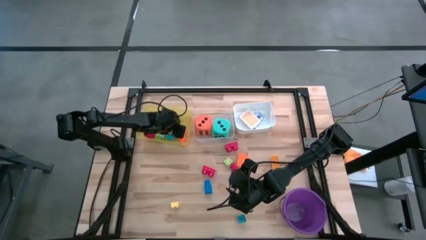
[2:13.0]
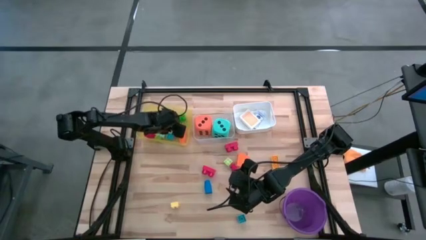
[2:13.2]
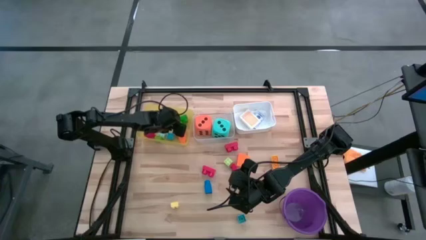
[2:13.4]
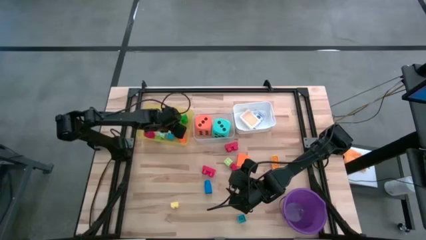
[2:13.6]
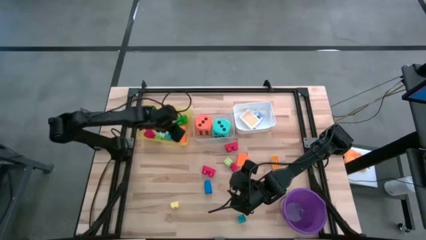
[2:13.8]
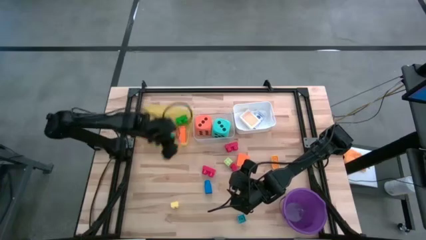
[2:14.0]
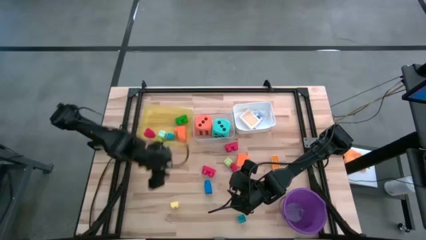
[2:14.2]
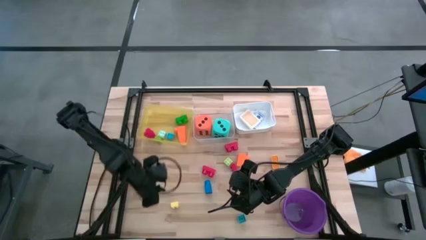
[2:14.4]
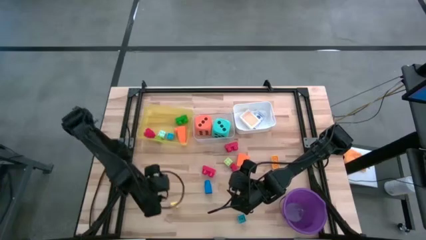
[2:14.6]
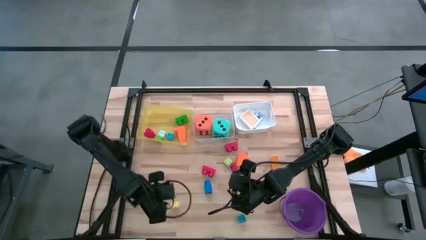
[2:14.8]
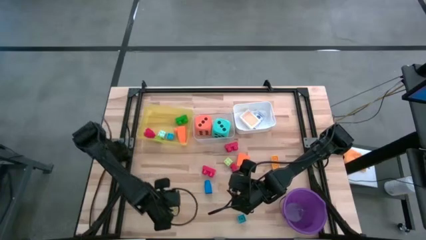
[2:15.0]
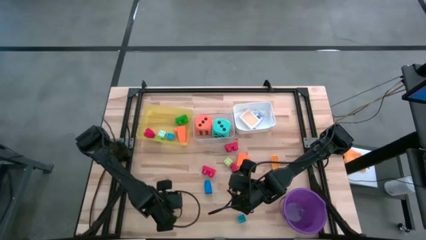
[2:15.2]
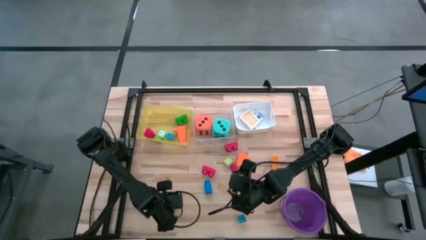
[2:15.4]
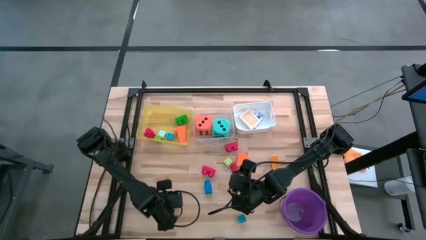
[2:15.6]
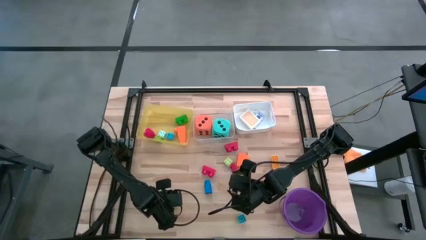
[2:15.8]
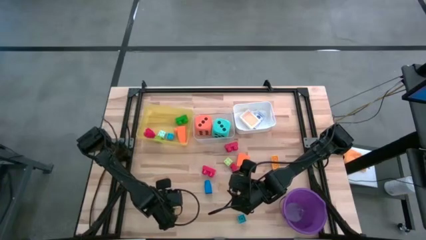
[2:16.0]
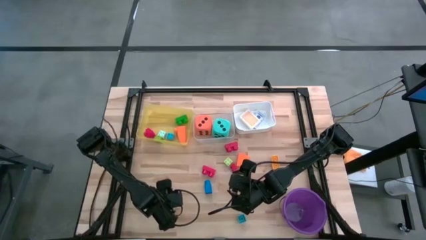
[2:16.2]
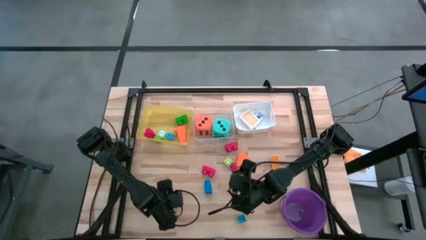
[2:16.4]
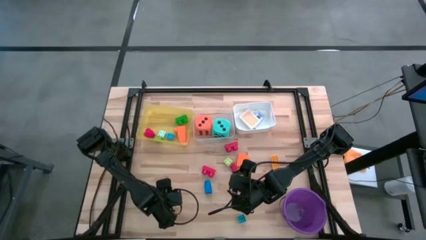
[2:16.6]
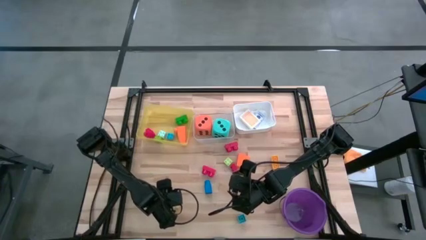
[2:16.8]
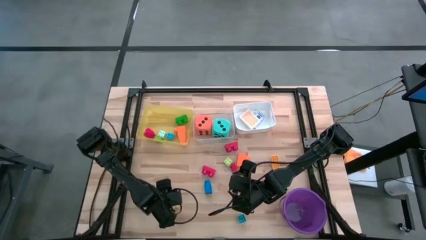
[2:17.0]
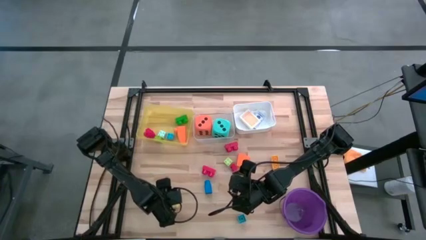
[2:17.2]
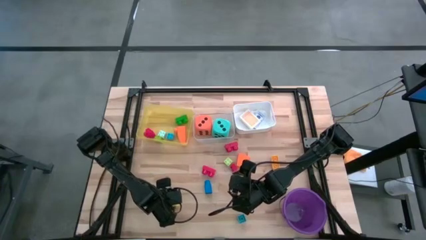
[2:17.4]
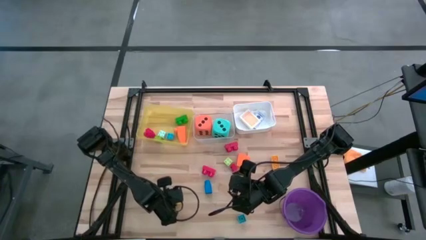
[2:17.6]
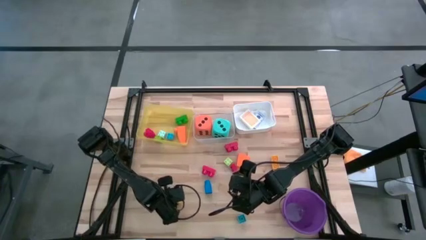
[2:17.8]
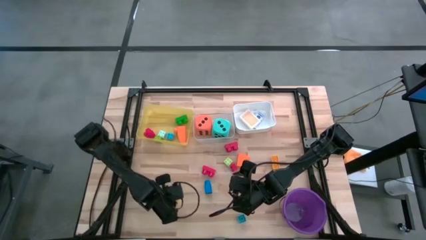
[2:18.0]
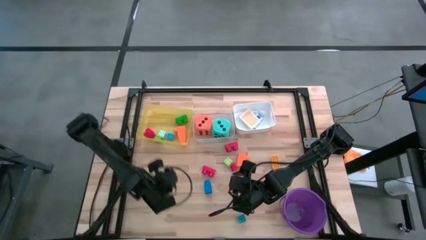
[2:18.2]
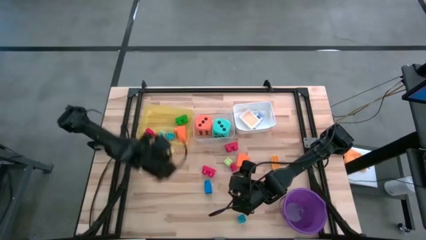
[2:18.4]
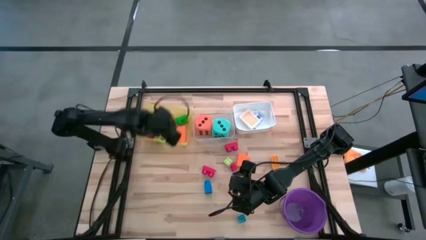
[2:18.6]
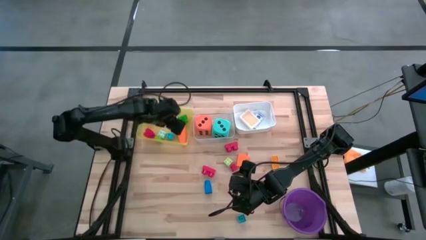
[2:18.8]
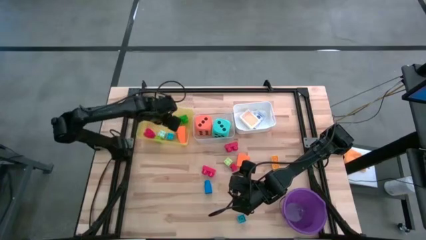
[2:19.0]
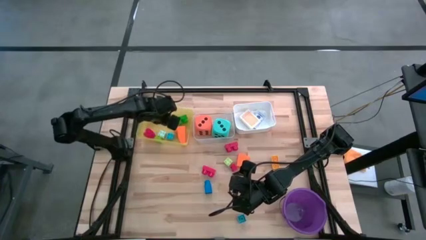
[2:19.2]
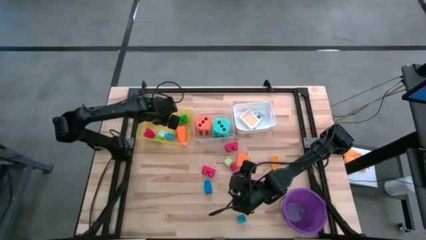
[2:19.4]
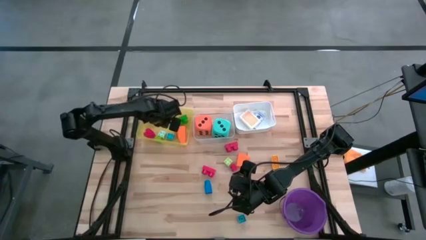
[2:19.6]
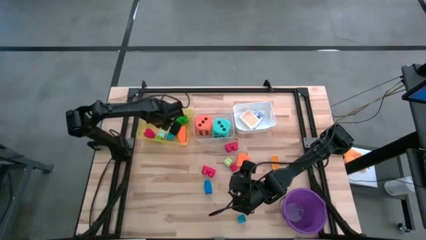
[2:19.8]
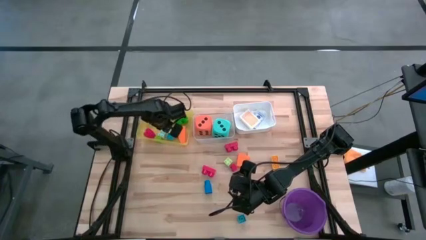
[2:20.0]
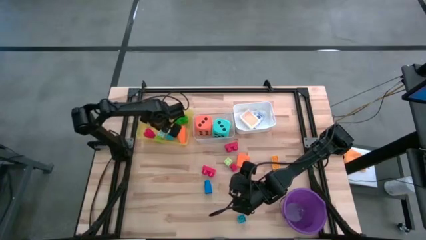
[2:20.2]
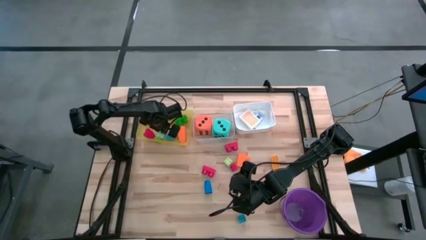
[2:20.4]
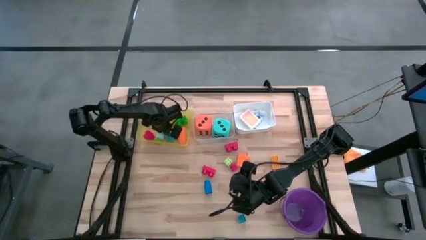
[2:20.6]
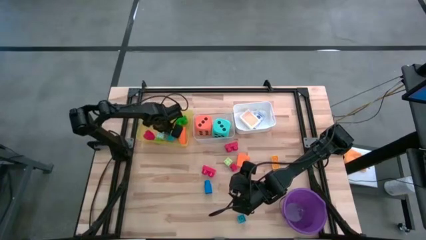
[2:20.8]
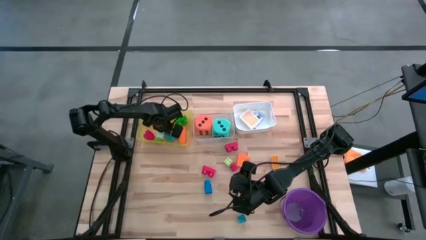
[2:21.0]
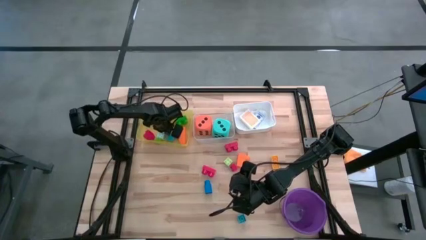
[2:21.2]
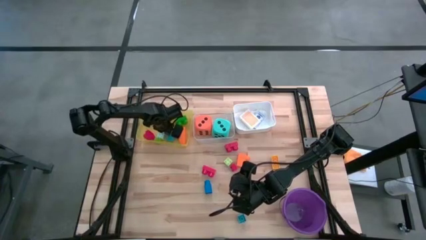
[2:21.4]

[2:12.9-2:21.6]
Task: Pick & Place Toys
Put the yellow game piece into the yellow bin

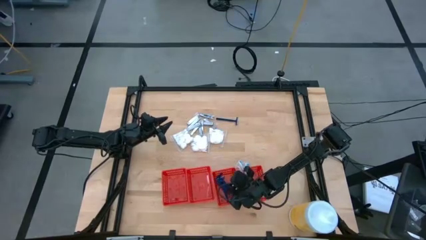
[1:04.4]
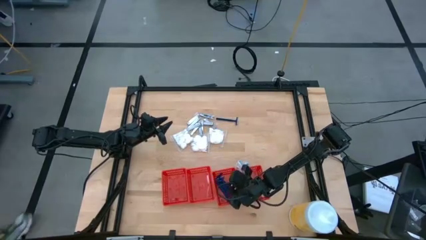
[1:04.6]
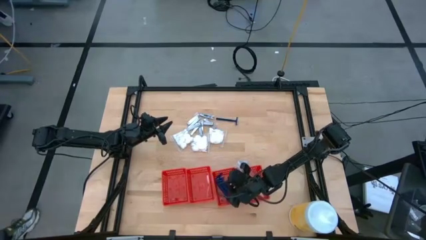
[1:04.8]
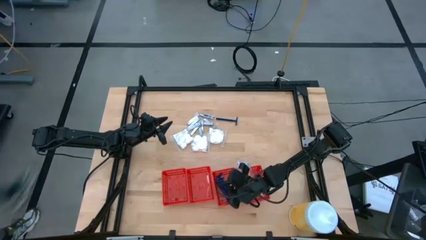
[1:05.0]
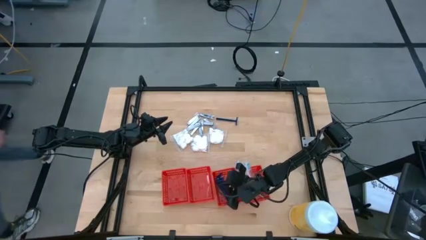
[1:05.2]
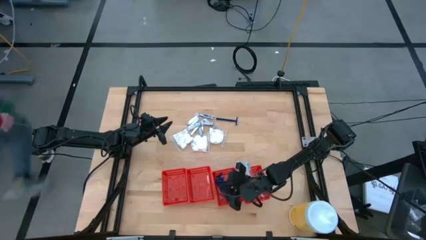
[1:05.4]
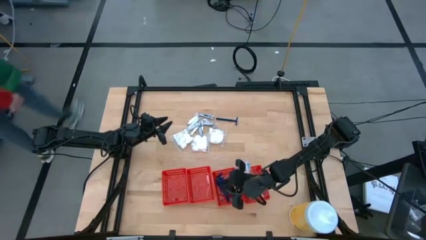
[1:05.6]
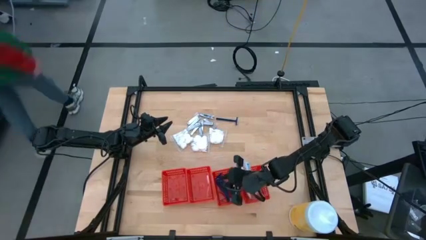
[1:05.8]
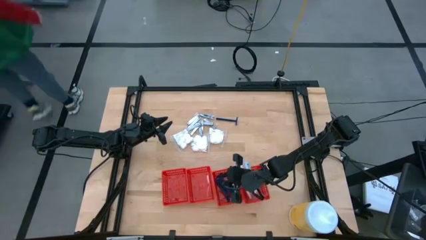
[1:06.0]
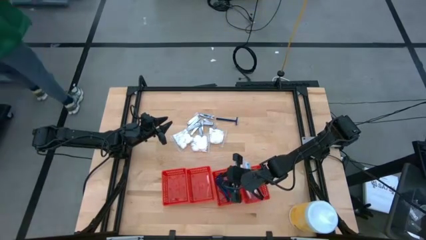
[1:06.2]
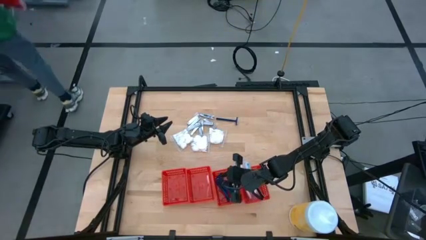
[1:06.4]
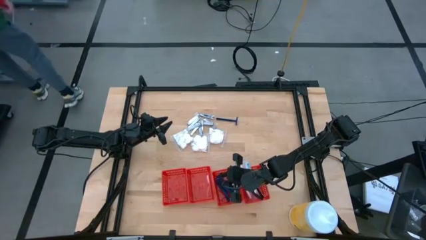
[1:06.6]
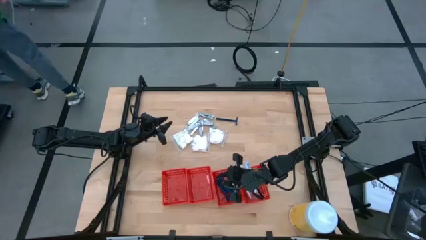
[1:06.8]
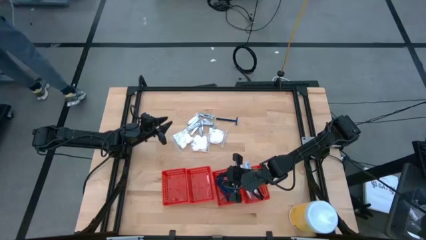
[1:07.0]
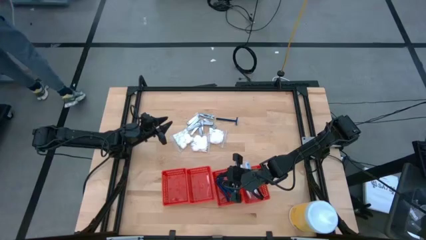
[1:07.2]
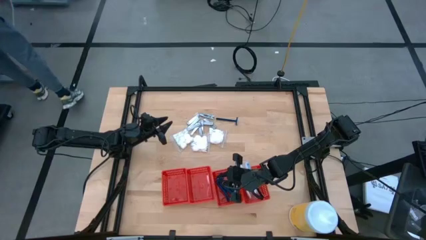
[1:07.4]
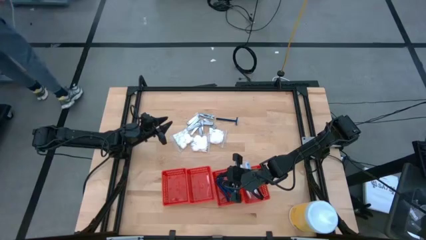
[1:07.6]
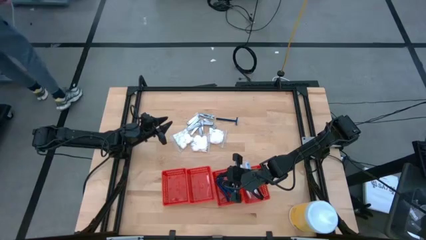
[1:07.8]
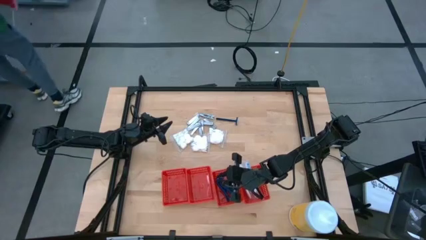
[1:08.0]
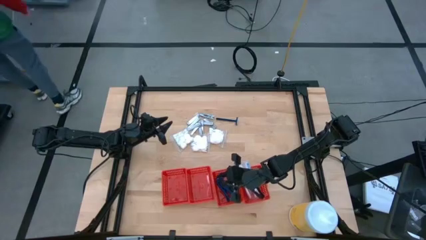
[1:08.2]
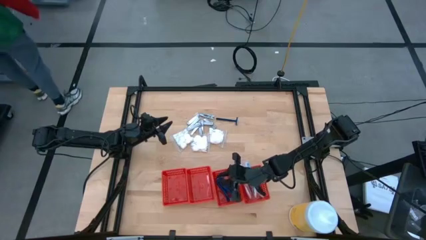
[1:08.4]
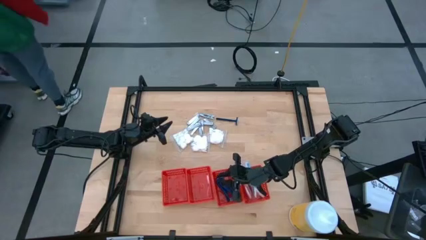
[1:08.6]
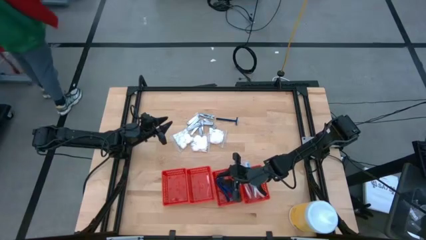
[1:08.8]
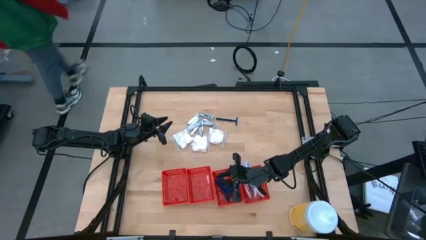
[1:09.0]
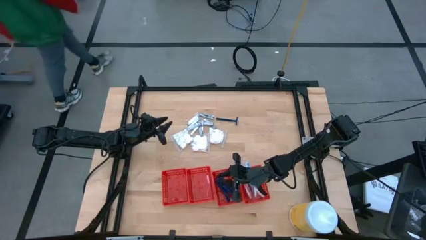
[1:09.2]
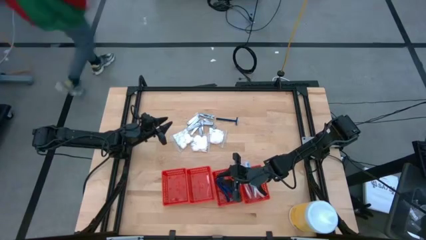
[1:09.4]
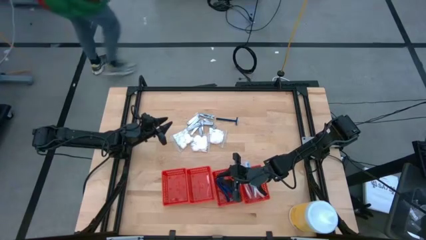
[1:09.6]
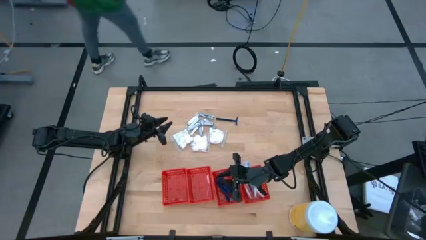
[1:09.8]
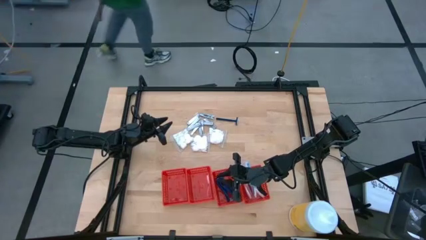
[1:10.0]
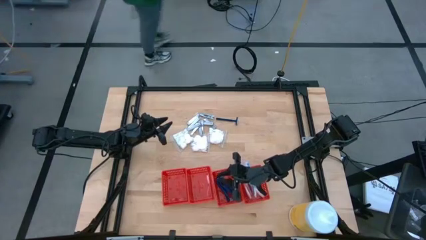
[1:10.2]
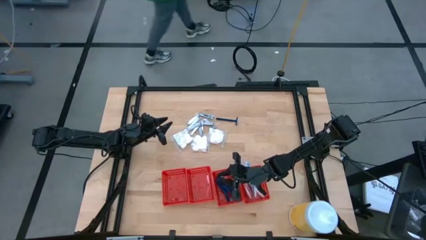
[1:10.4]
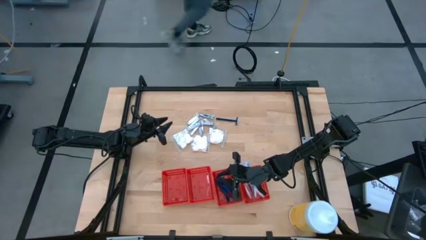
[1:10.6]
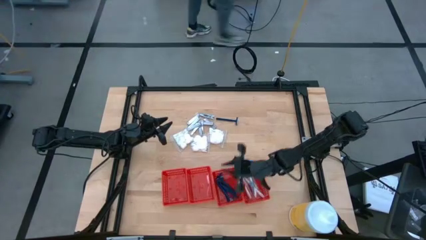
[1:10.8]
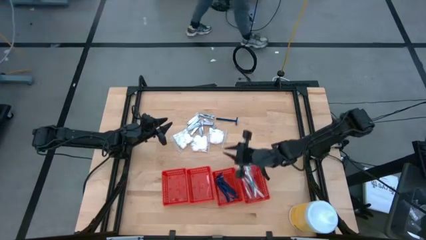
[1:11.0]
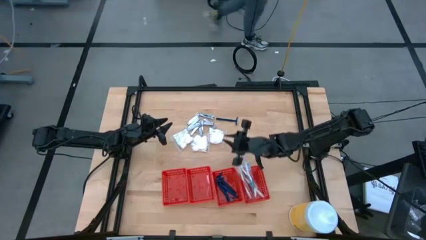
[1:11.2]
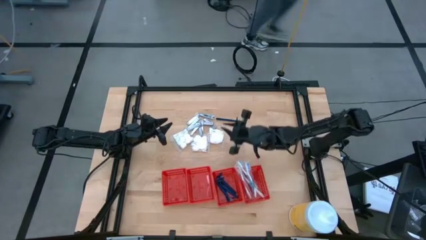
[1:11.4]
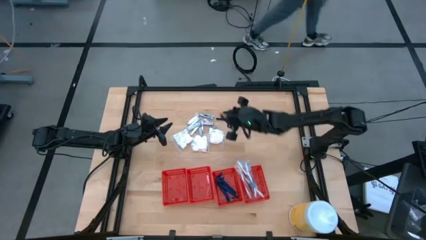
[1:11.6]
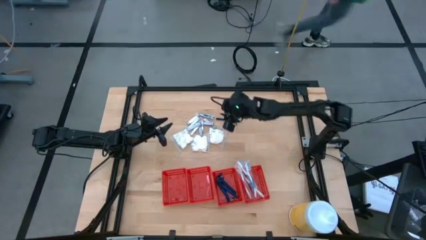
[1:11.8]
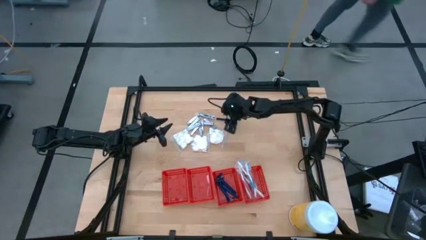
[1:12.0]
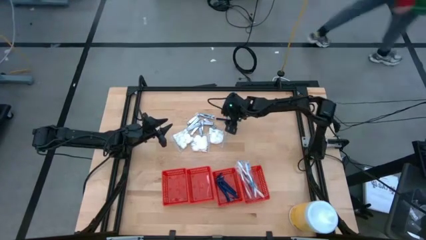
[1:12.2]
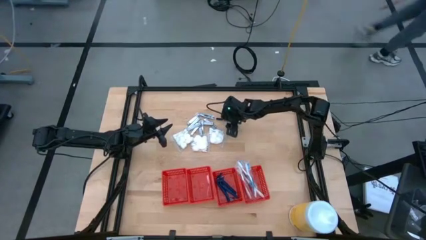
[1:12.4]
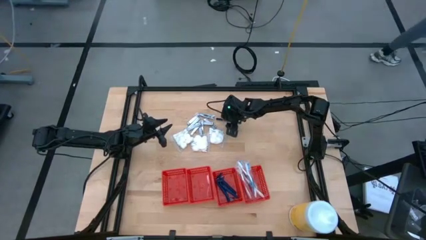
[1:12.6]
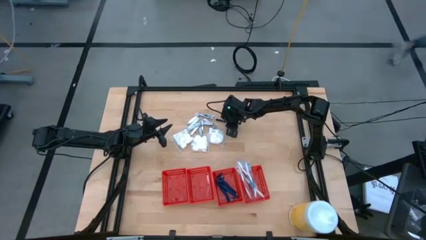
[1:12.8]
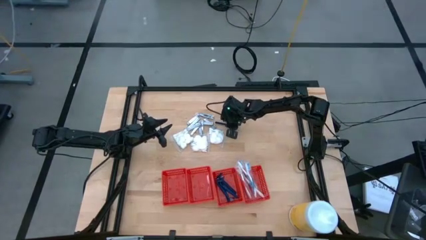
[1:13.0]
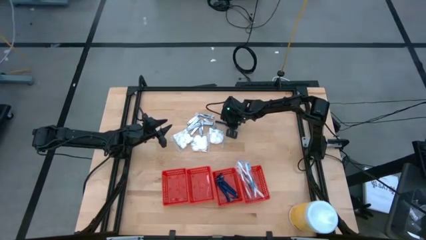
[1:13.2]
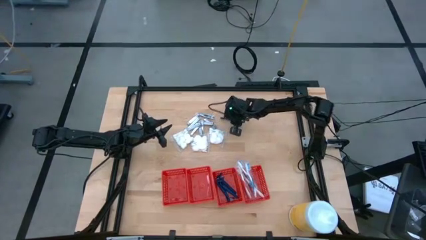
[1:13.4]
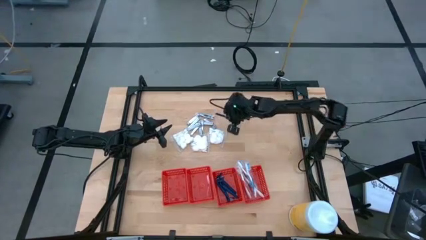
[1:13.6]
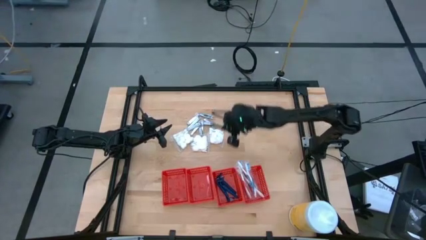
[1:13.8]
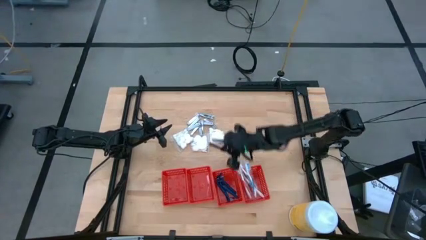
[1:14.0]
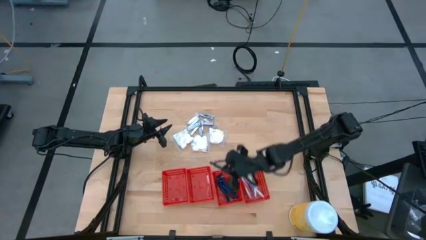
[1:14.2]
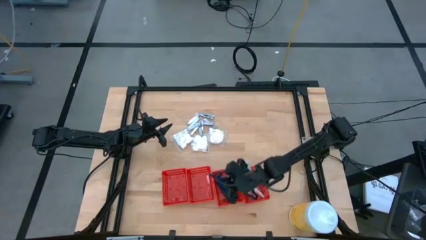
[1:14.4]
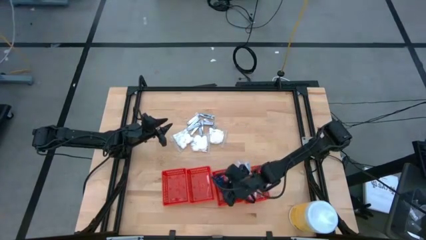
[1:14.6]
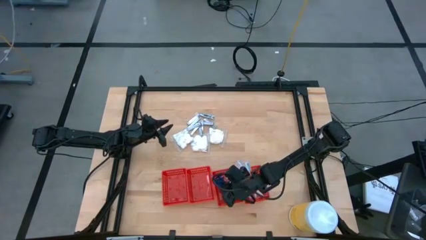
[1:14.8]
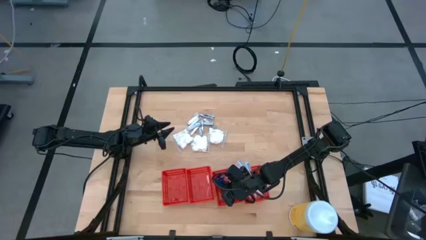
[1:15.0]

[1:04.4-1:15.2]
Task: Pick & Place Travel size toiletries
Put the blue razor into the middle right red bin
